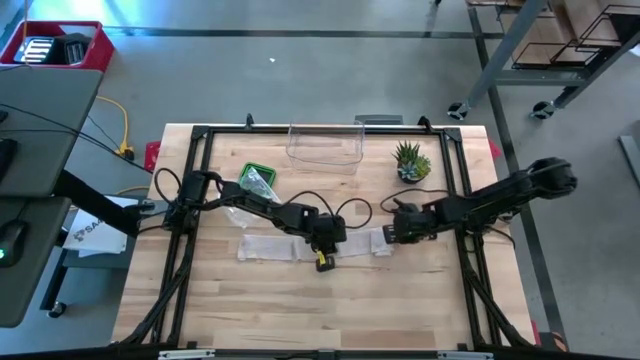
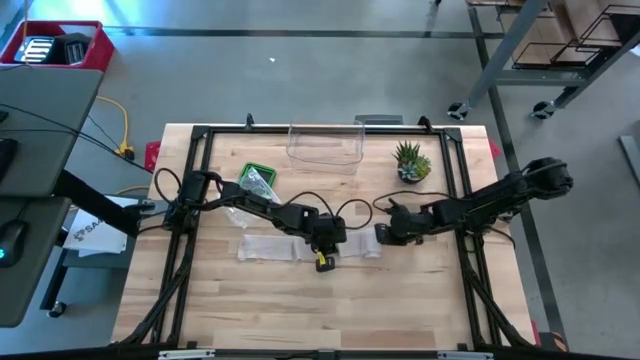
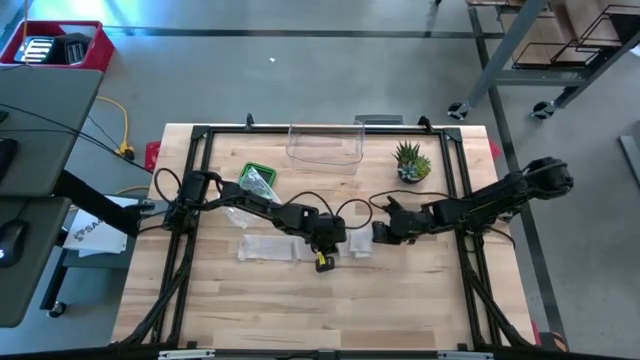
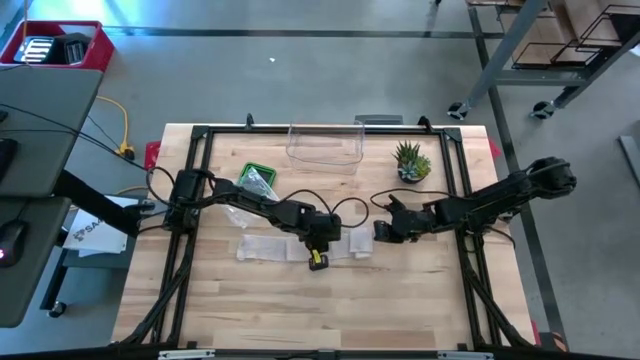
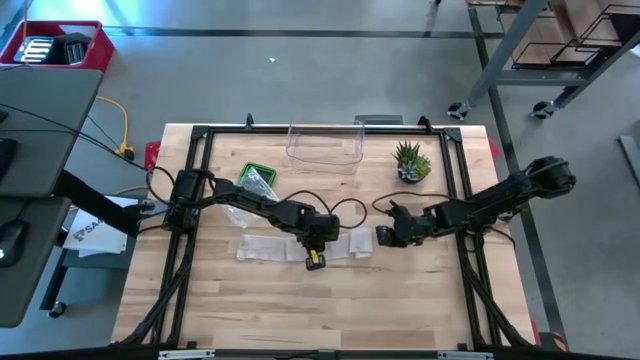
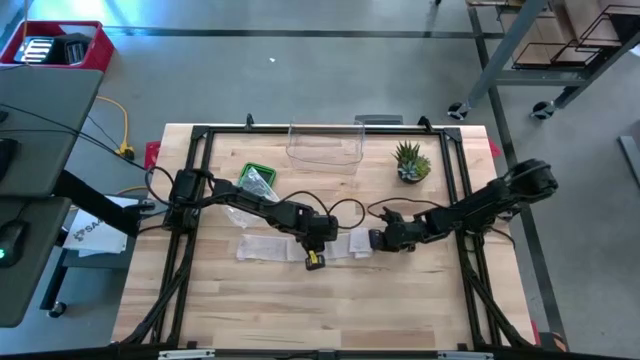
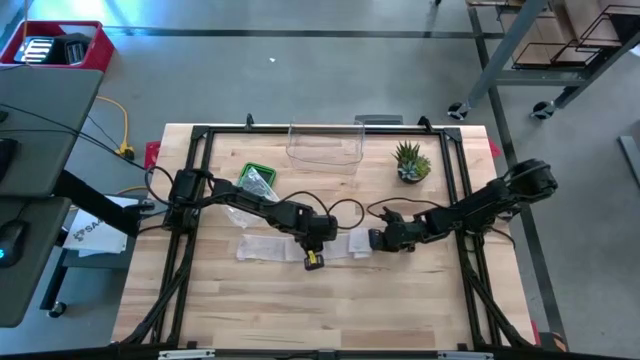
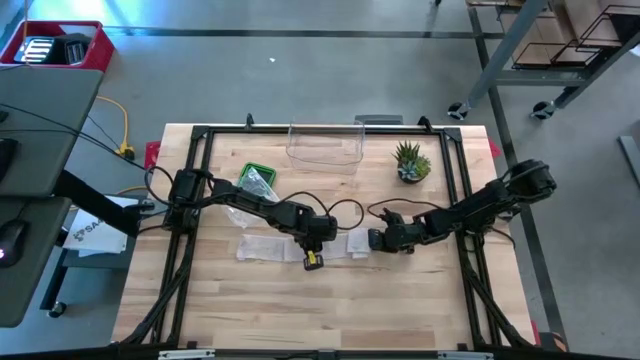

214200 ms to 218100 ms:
Task: Roll bandage
Roll the bandage

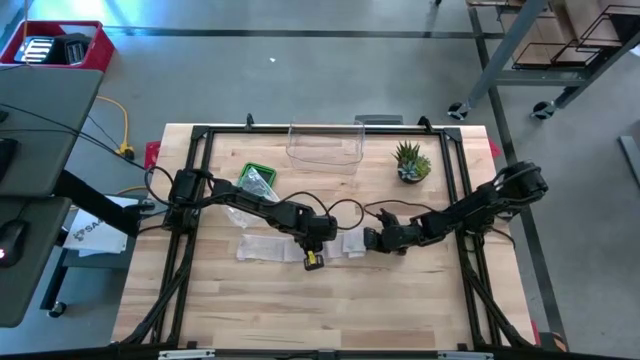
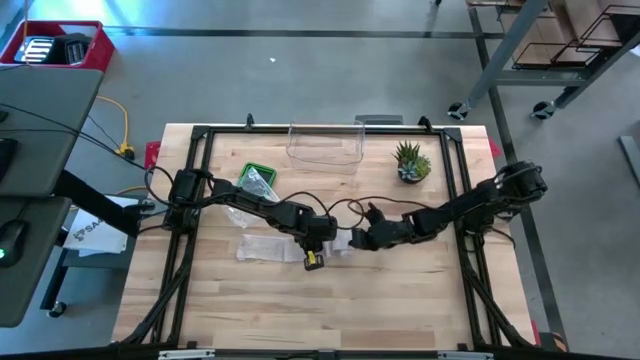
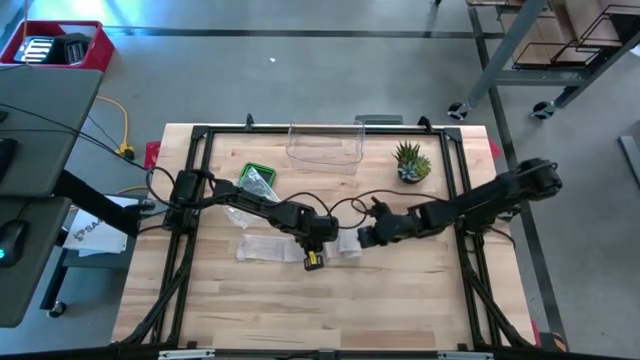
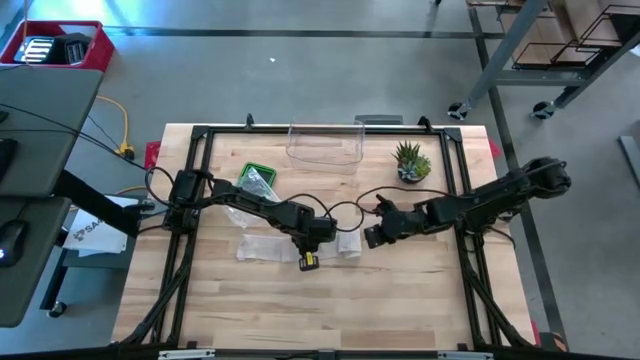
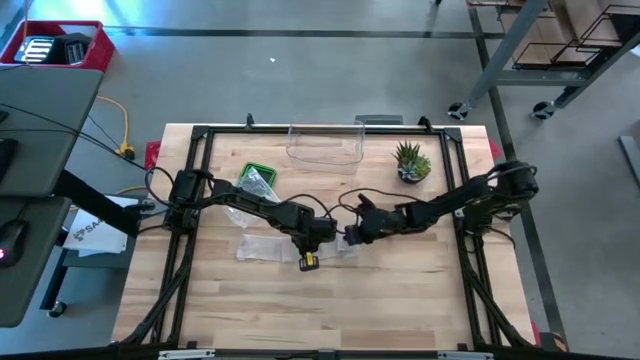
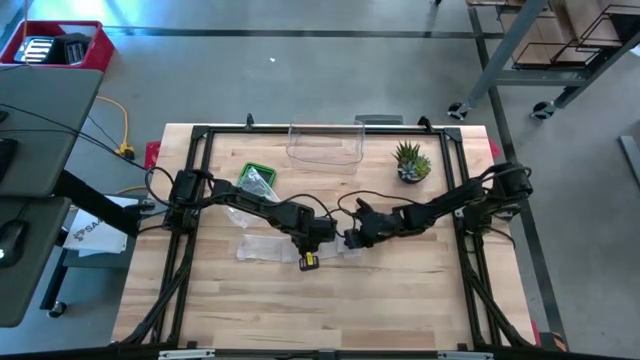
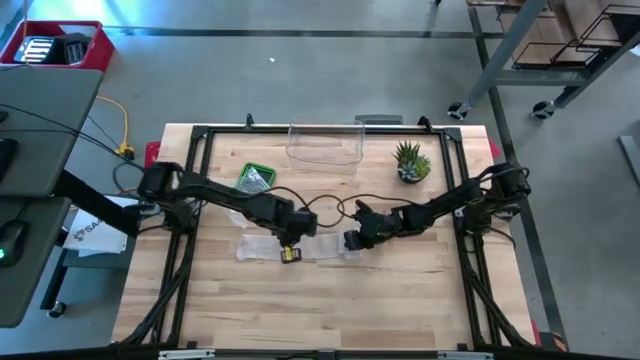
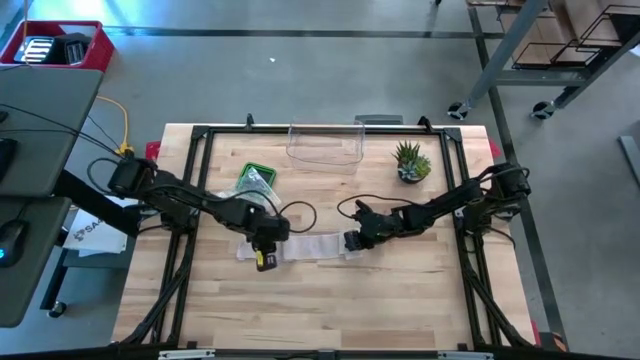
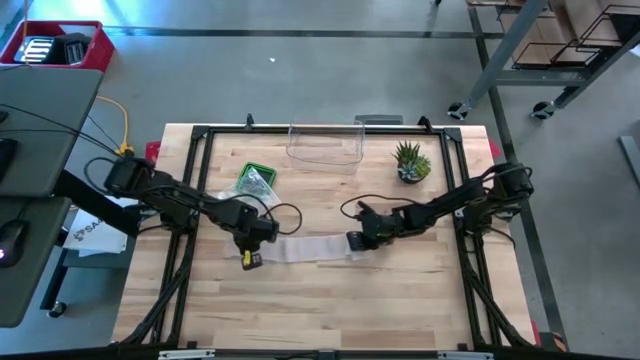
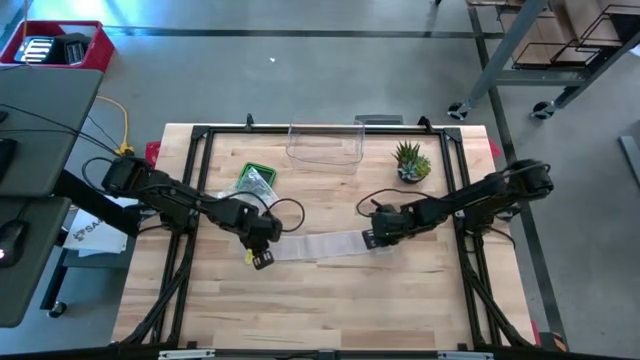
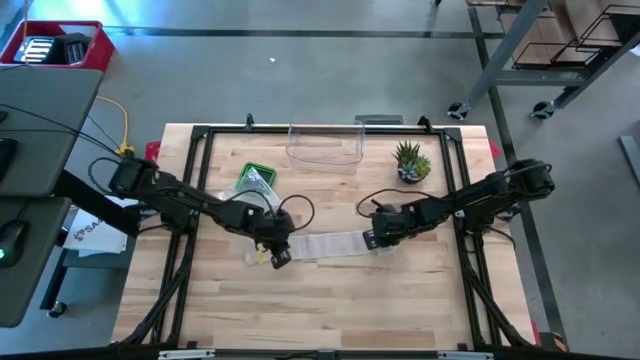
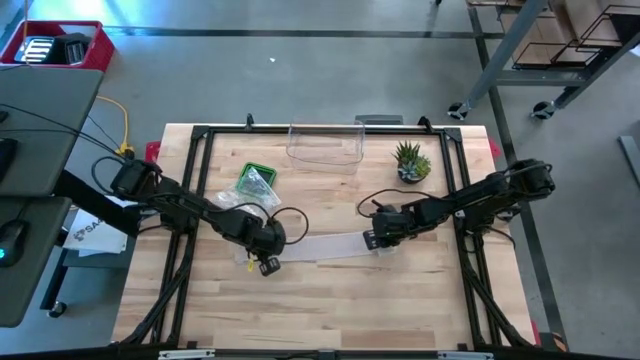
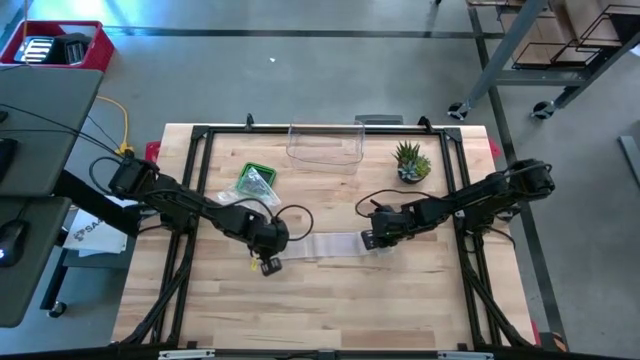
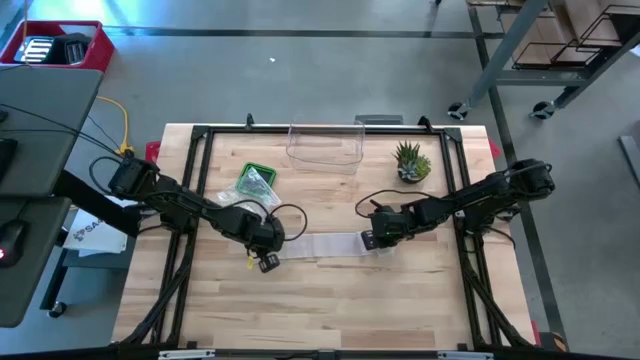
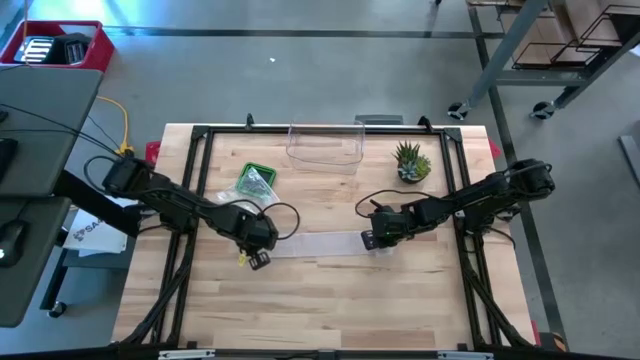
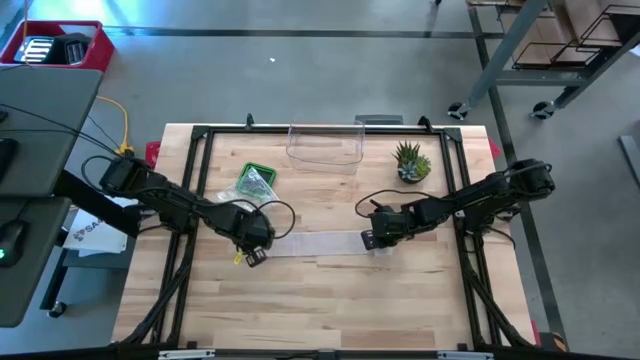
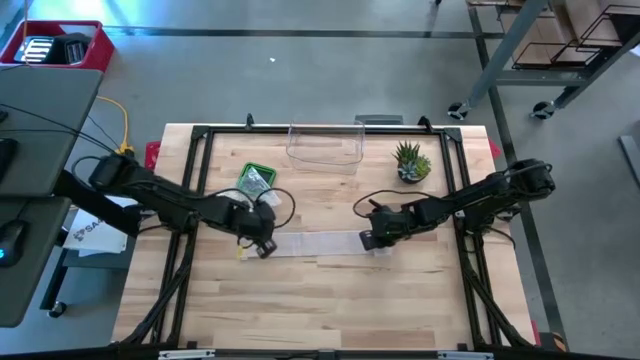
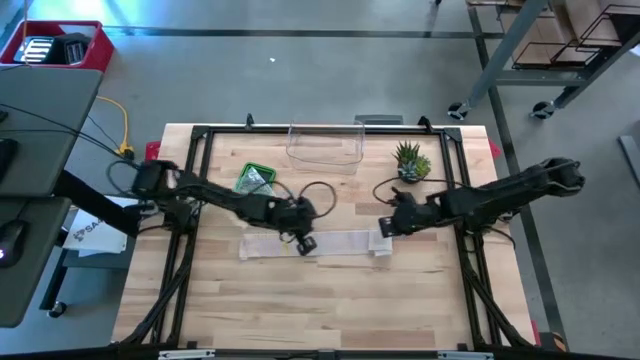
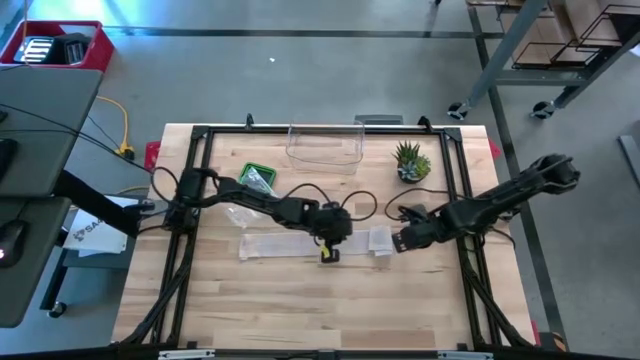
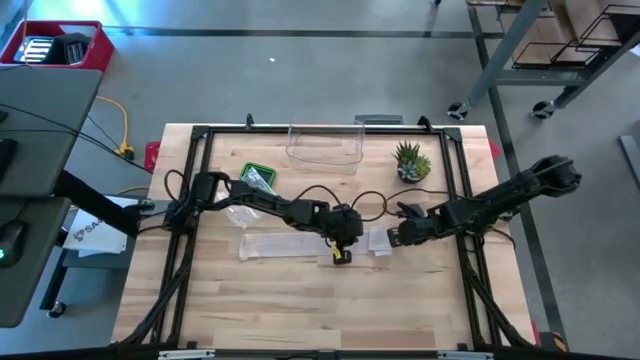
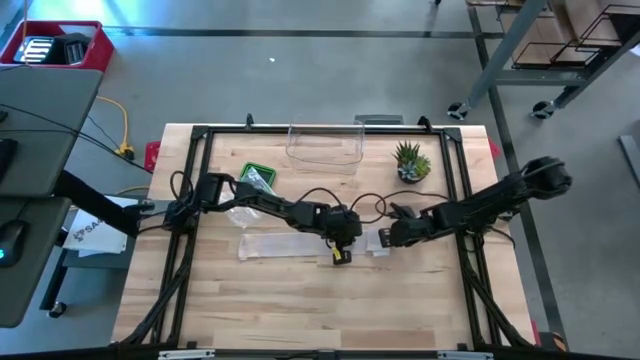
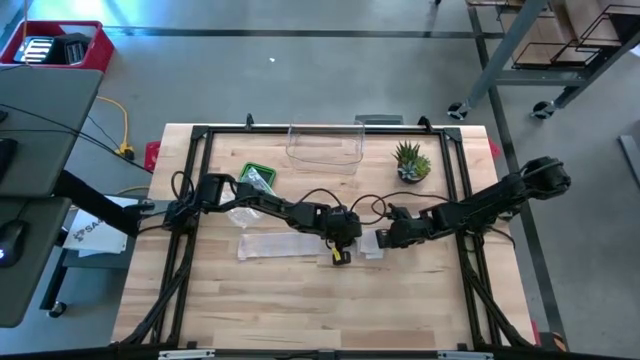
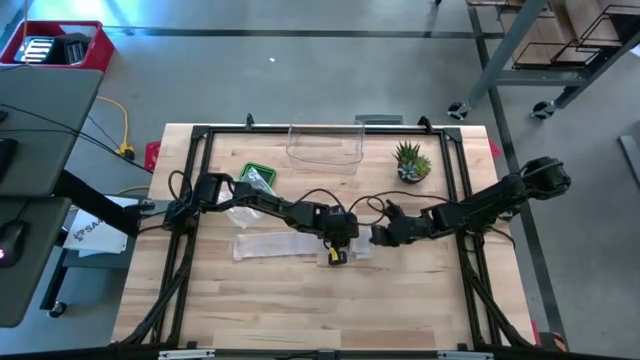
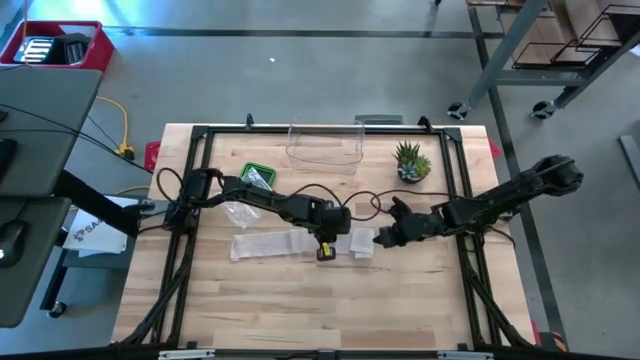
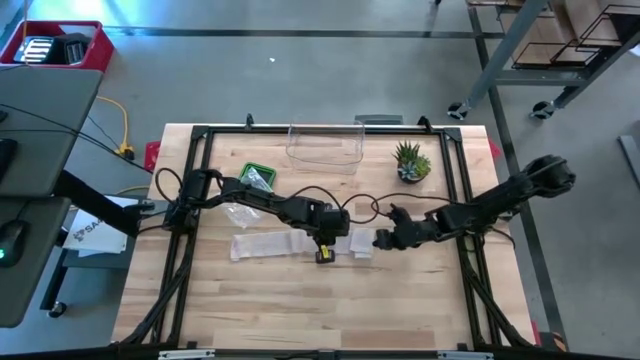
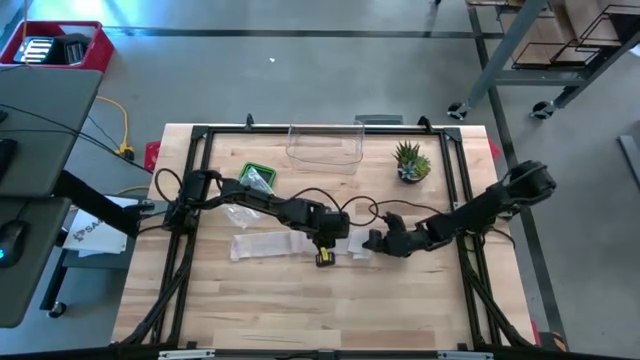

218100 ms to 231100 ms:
Roll the bandage

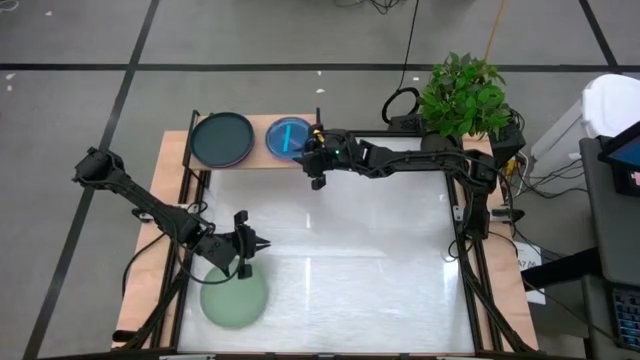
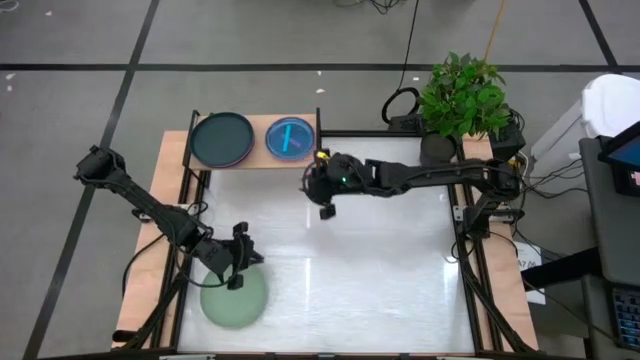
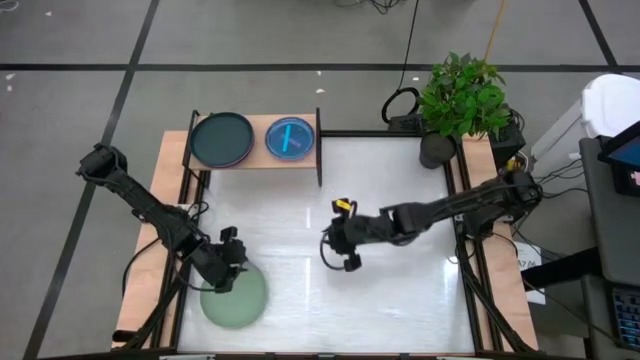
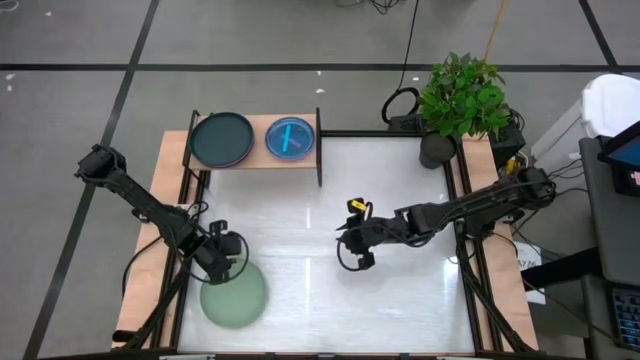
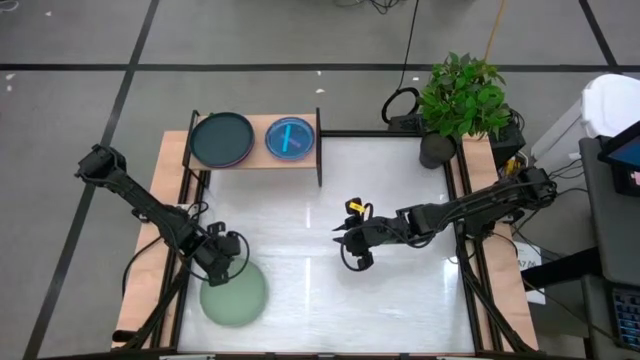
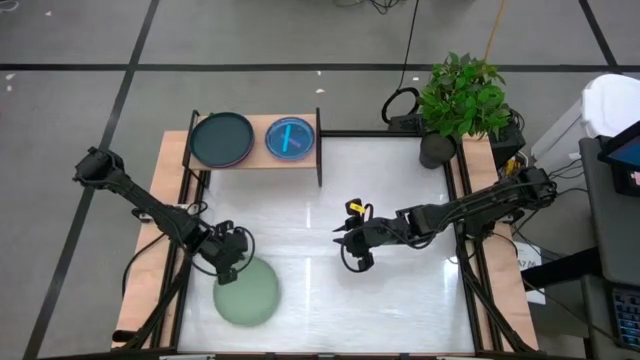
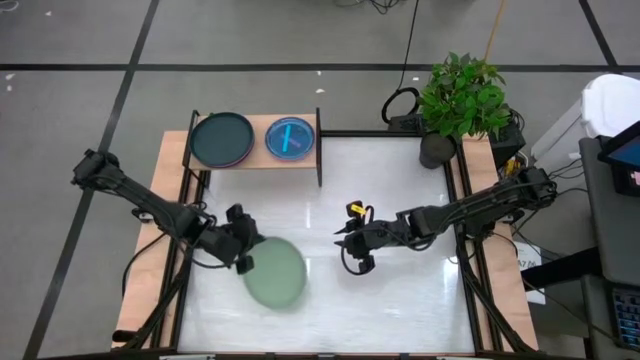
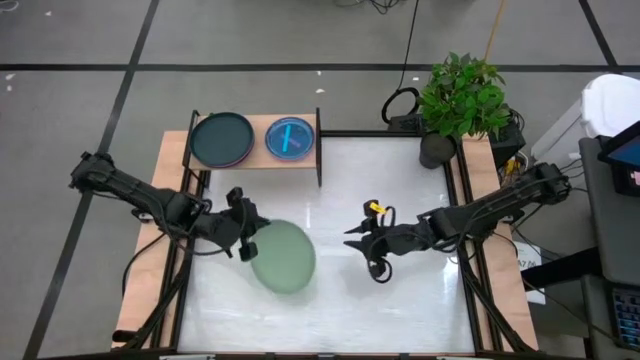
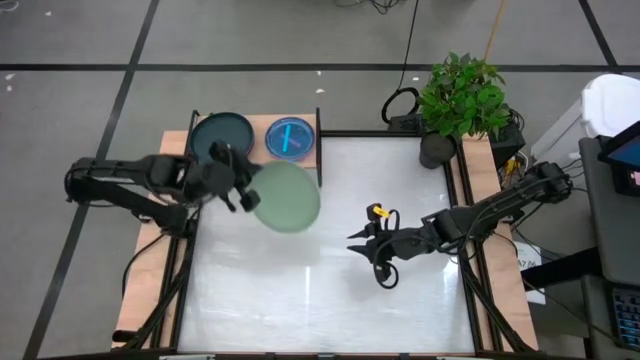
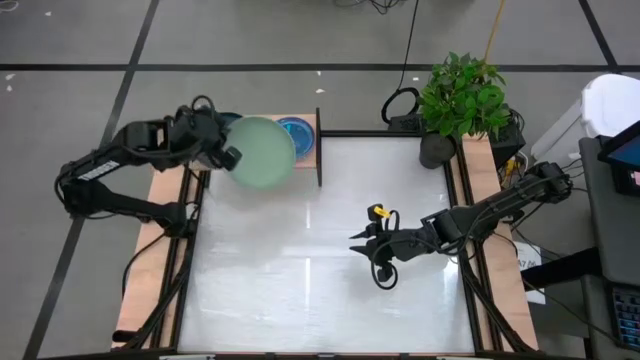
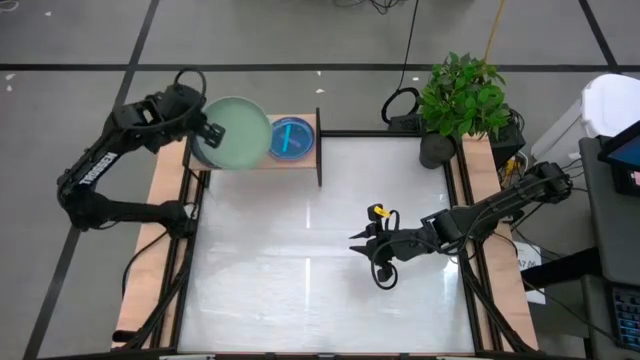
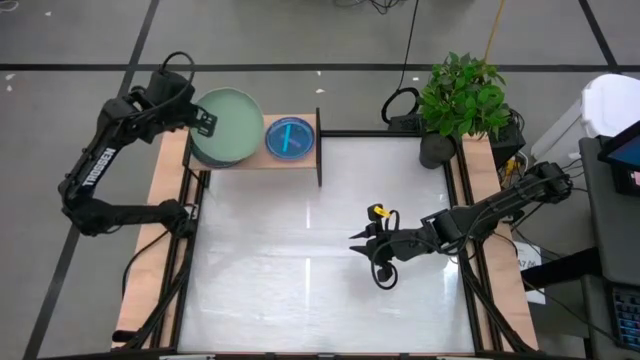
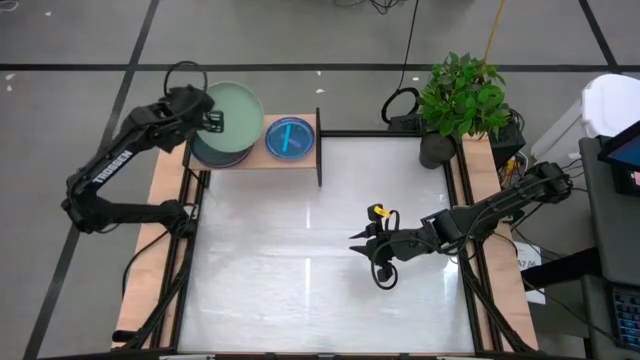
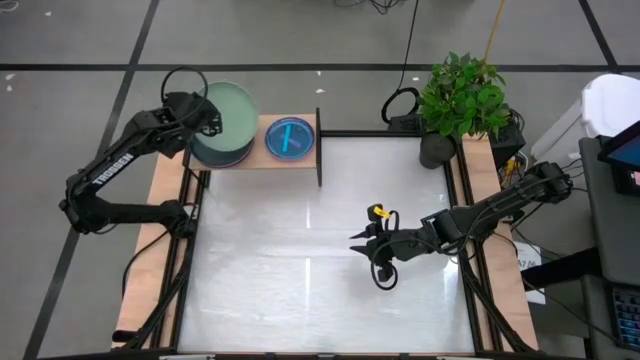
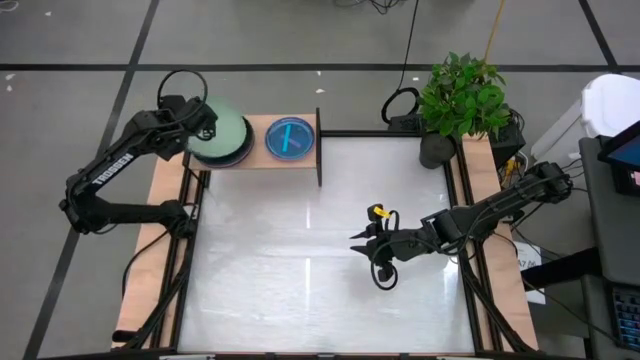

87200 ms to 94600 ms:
Task: Place and stack plates onto a shelf
Stack the green plate on top of the black plate on the shelf
